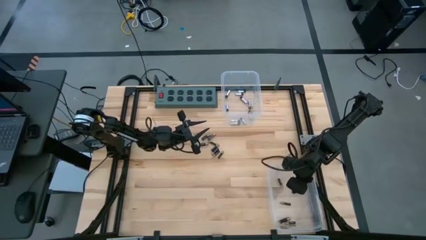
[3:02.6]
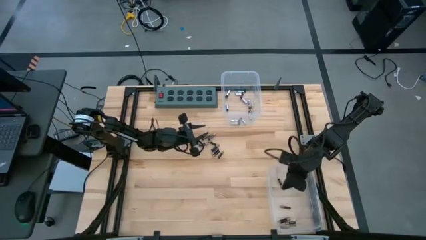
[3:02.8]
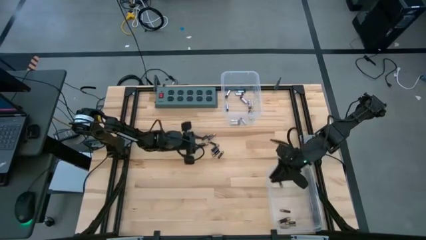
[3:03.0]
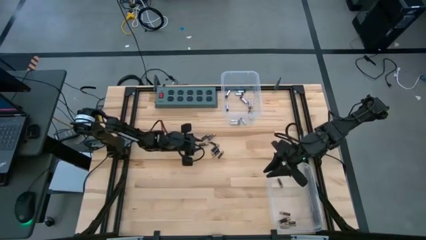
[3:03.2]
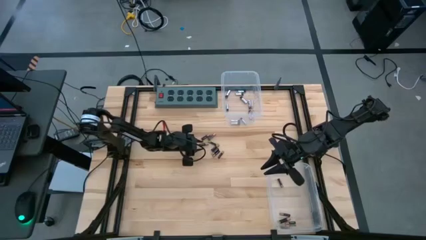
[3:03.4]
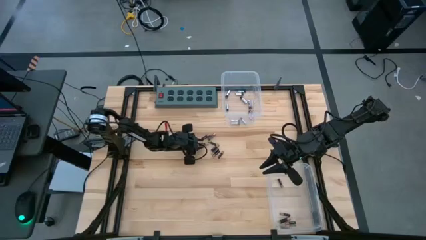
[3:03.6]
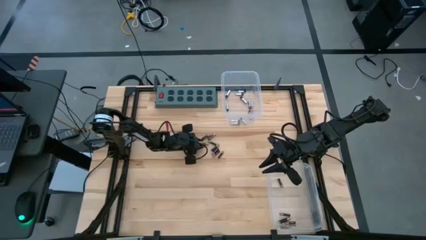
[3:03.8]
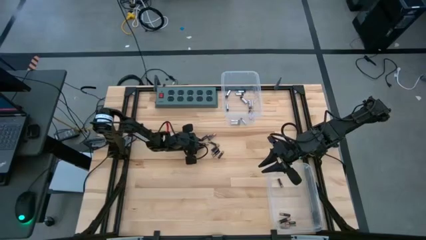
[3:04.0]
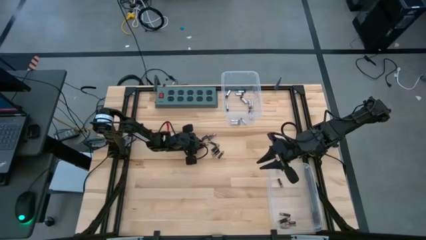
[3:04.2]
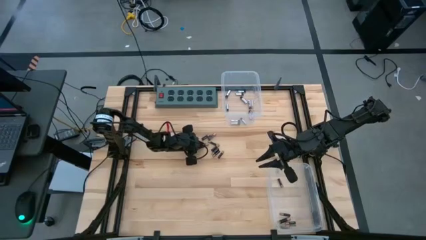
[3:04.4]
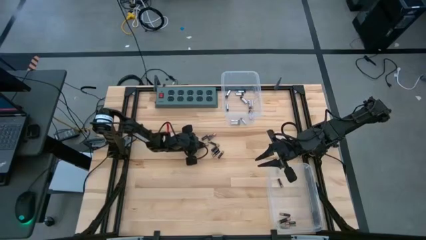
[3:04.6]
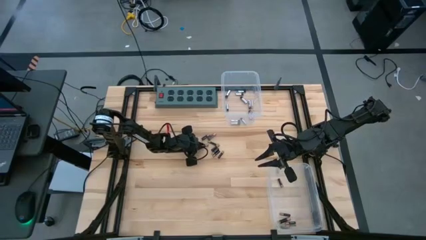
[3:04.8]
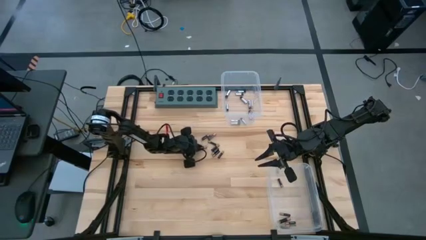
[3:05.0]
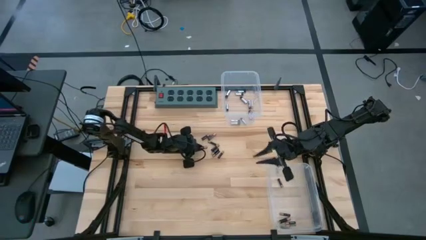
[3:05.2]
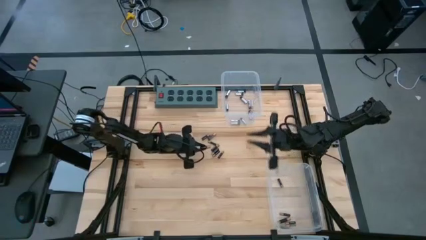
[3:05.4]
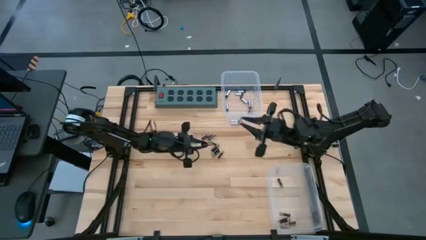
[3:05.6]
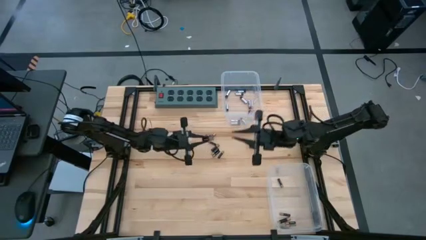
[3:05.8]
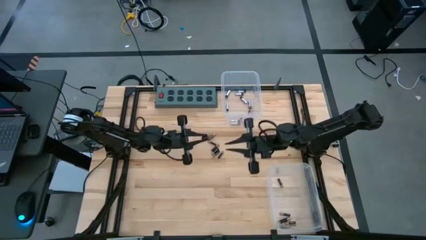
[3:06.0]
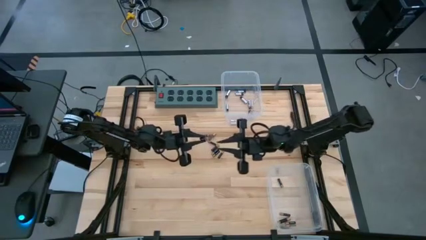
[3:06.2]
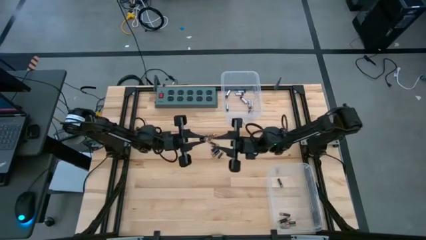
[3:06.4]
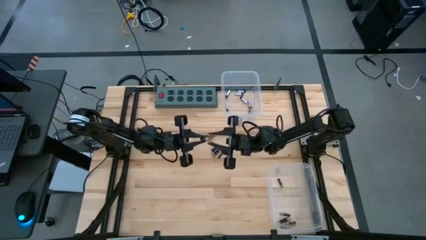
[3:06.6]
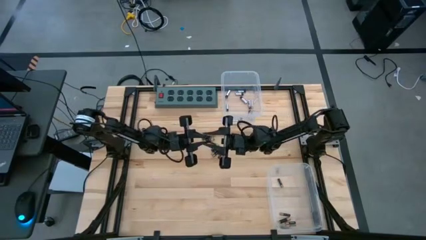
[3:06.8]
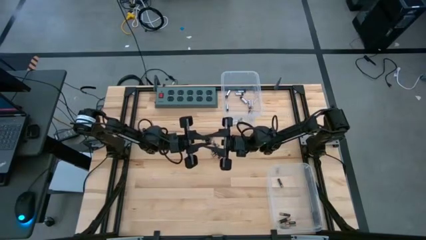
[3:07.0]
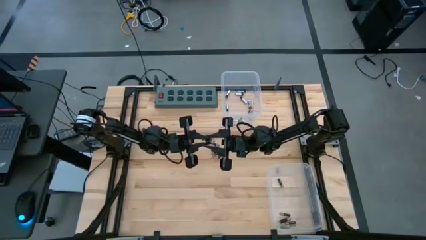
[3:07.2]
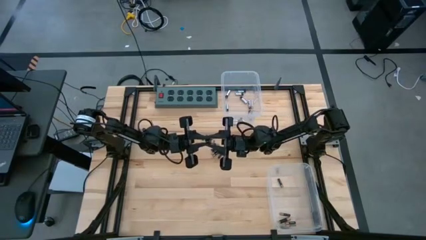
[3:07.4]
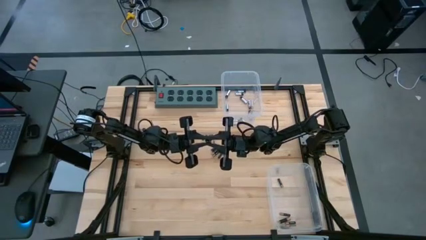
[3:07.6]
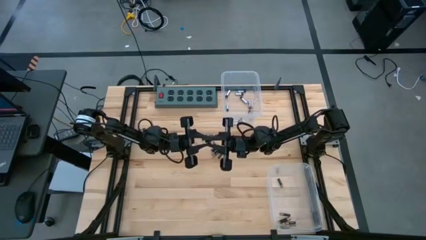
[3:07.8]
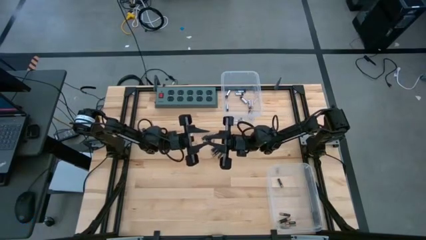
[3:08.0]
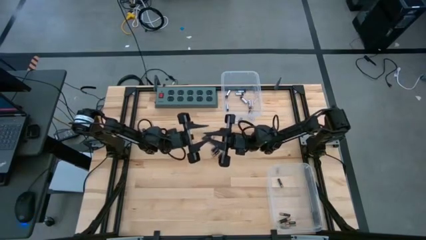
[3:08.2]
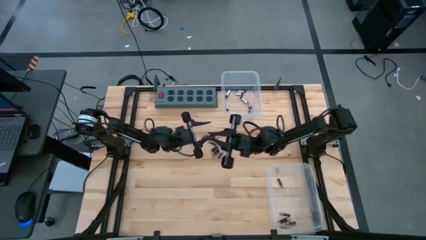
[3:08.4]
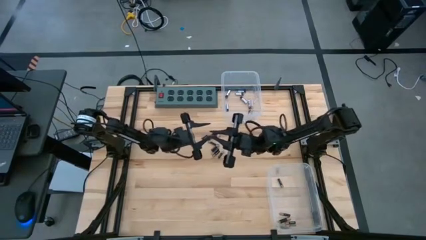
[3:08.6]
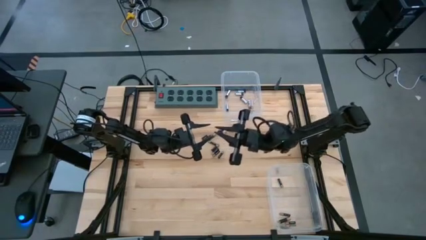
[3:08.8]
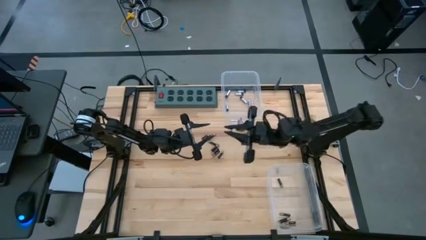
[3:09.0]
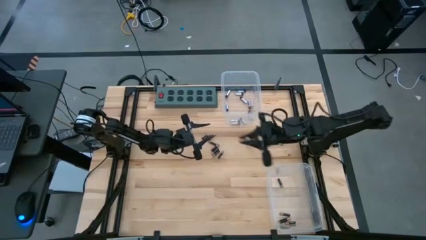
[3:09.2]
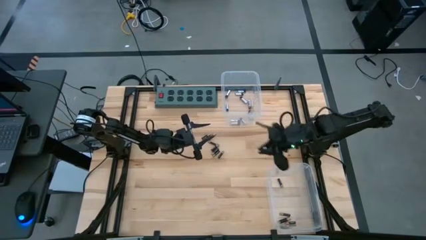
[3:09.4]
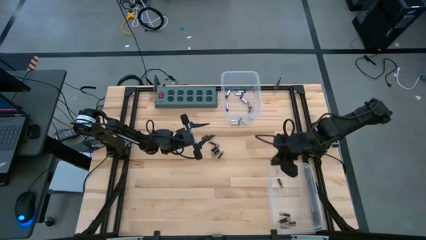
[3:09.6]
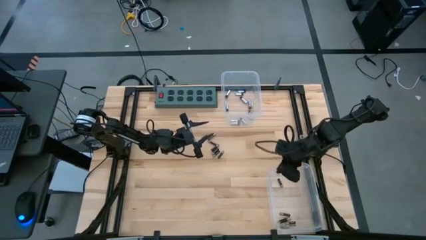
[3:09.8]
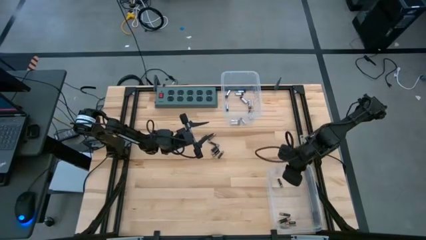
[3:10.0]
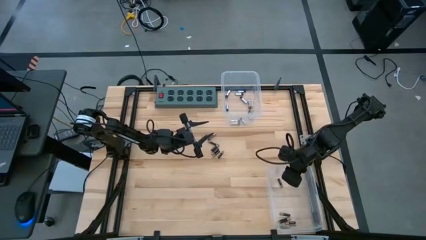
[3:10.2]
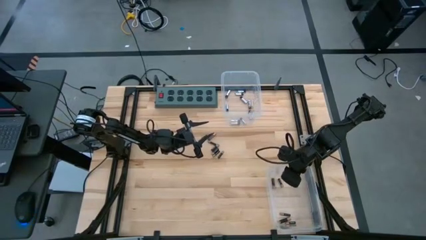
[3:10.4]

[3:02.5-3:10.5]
Task: Sort batteries
Put the black battery into the bottom transparent bin

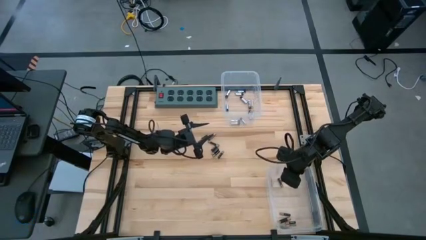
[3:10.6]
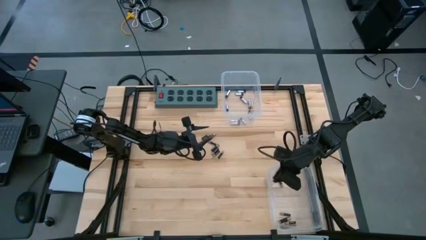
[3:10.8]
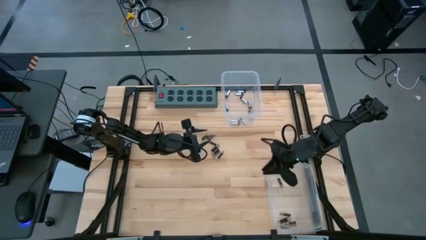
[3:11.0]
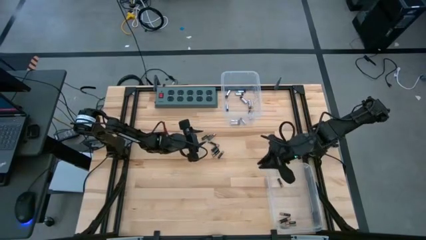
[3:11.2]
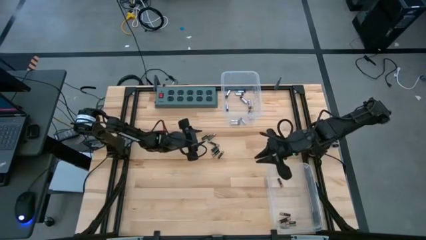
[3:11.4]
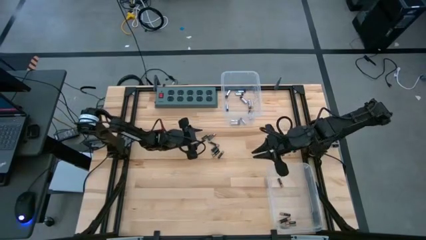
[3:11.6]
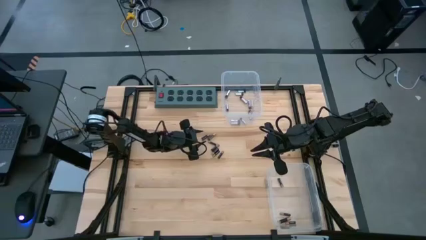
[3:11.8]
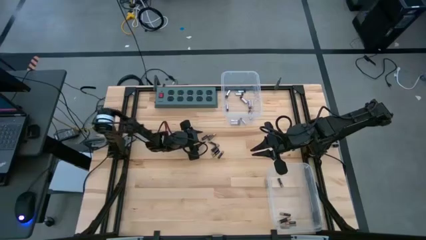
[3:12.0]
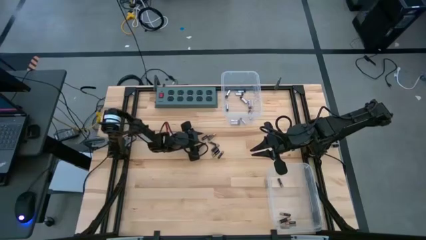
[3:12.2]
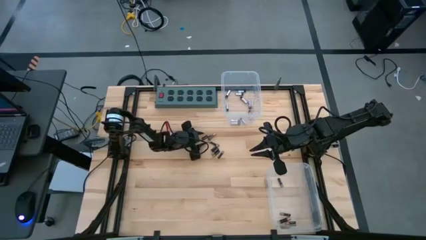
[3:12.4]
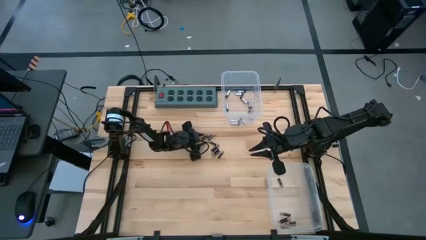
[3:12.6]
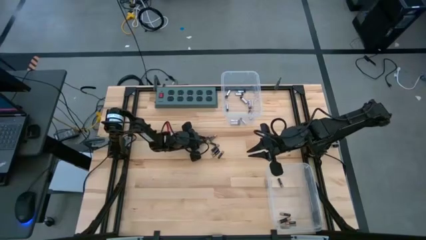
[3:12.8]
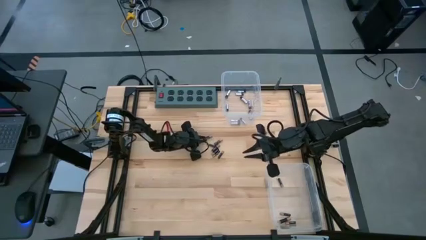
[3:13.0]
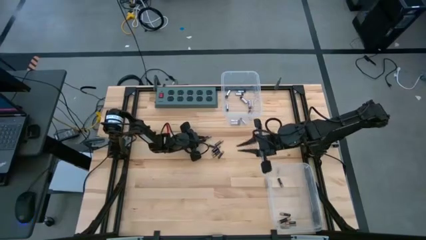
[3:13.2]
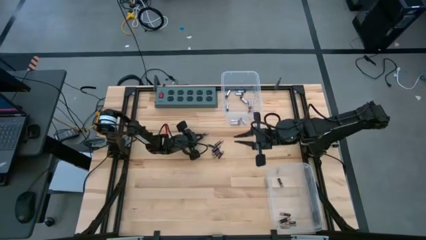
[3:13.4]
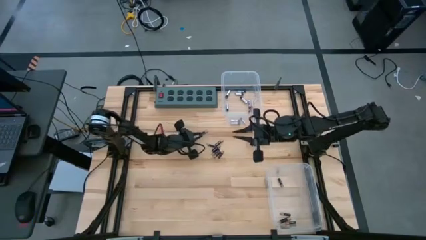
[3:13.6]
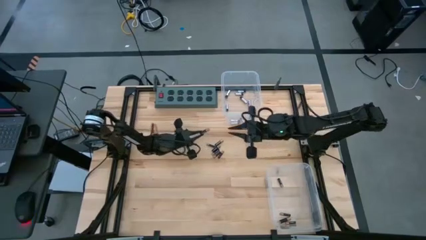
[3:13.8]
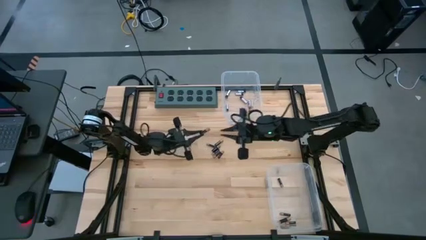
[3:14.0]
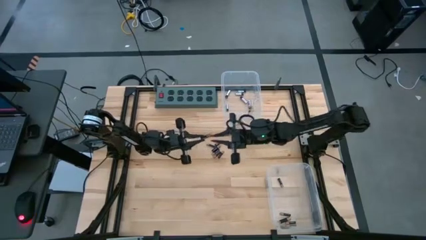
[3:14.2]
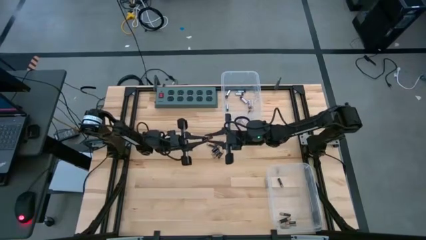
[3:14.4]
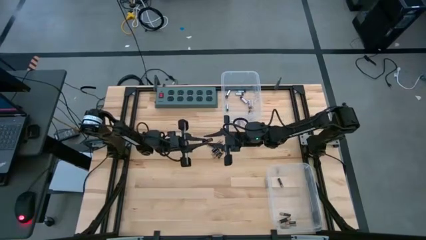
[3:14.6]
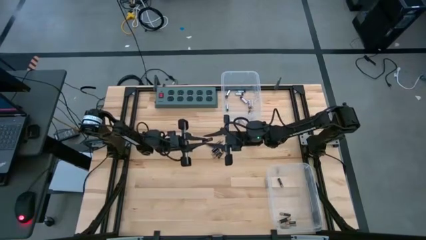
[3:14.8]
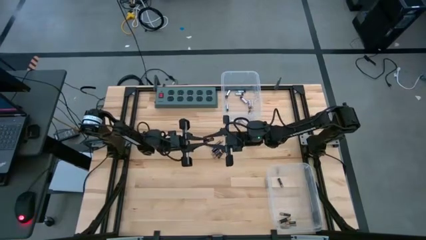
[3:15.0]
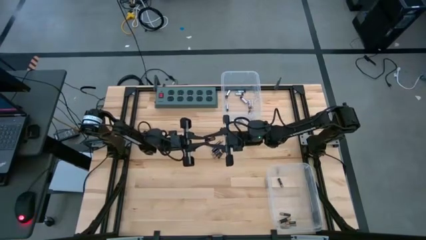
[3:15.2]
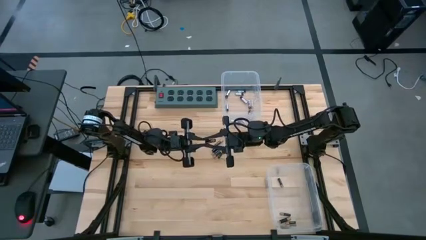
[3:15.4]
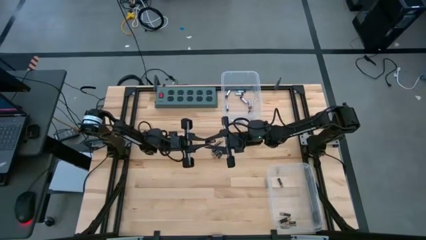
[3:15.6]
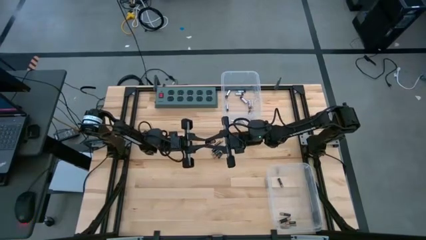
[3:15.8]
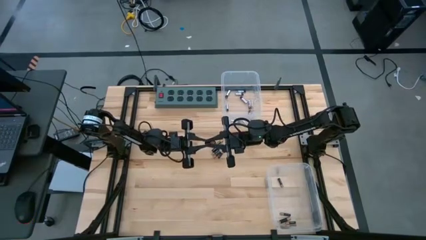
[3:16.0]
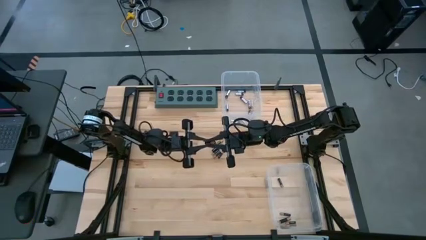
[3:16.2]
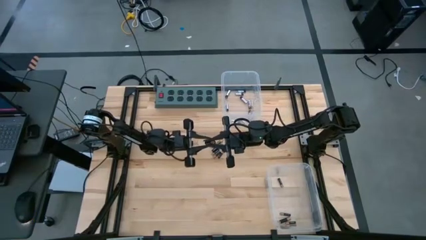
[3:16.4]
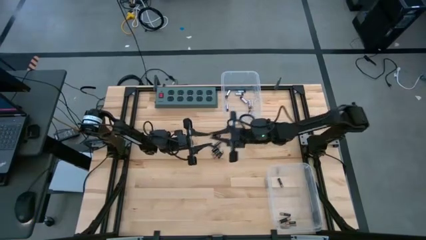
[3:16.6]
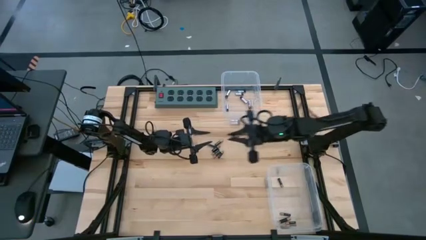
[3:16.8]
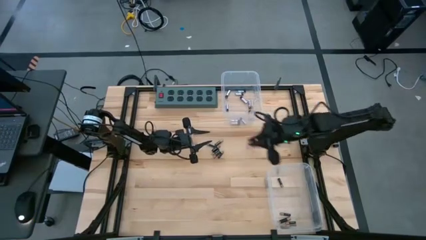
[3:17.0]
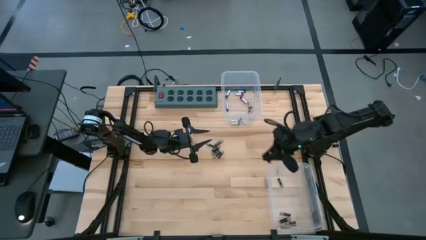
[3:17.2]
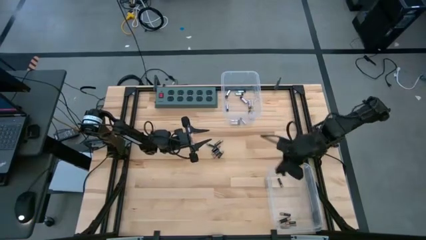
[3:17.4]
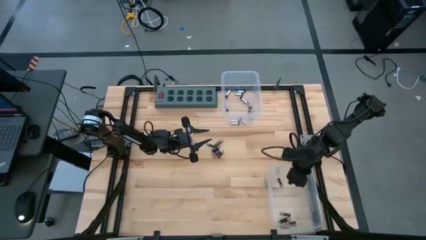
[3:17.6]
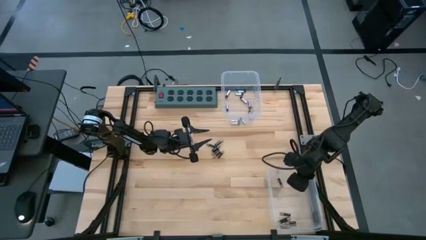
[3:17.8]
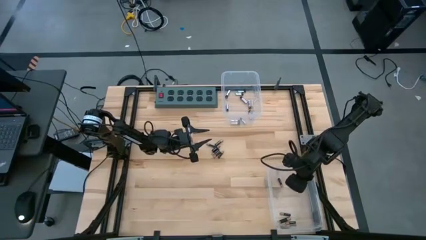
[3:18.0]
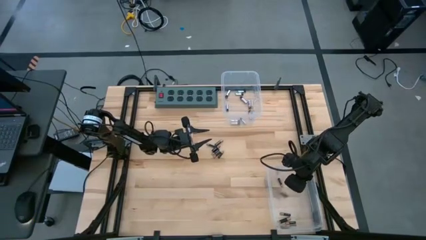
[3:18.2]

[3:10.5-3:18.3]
Put the black battery into the bottom transparent bin

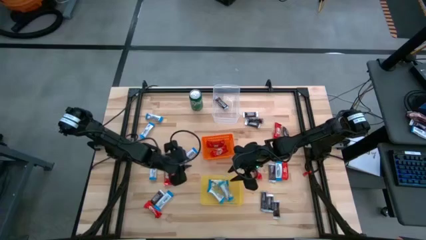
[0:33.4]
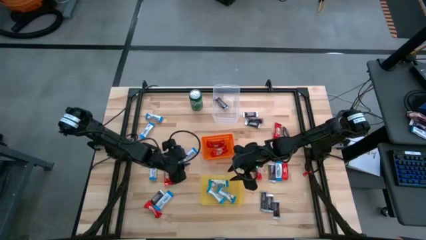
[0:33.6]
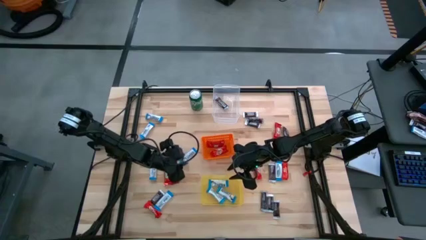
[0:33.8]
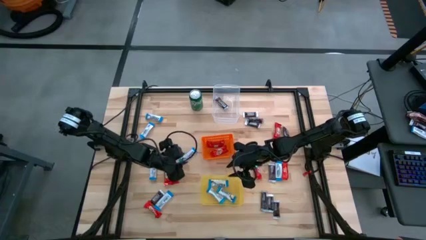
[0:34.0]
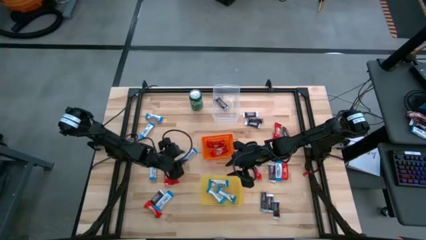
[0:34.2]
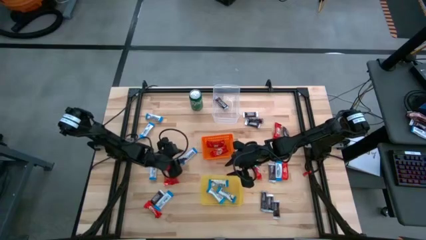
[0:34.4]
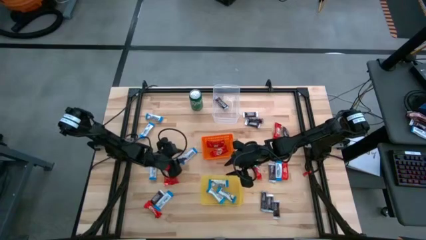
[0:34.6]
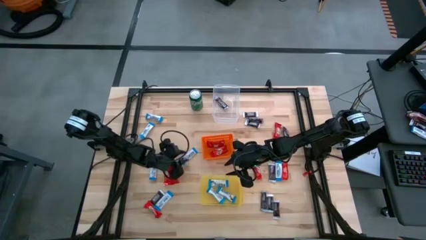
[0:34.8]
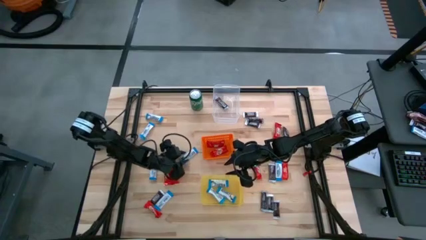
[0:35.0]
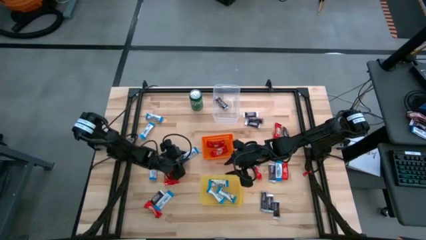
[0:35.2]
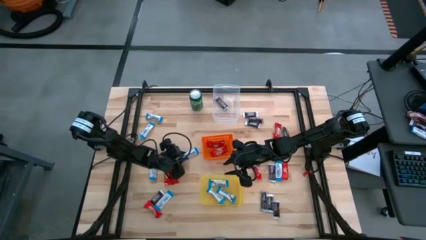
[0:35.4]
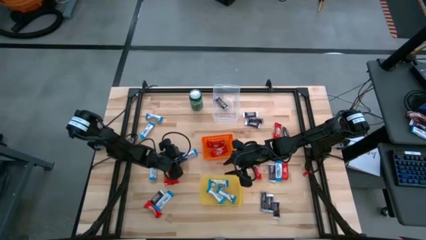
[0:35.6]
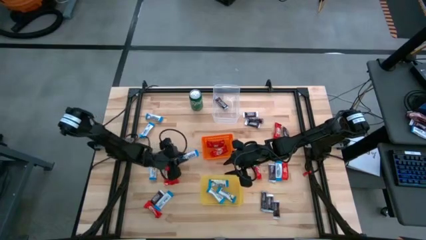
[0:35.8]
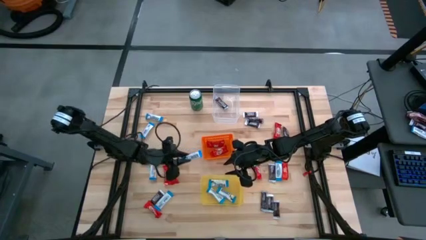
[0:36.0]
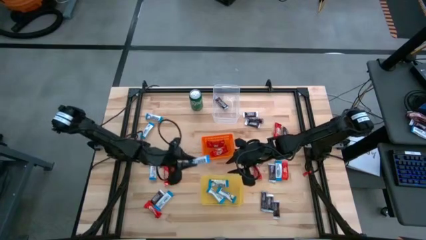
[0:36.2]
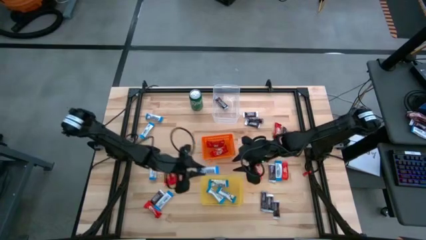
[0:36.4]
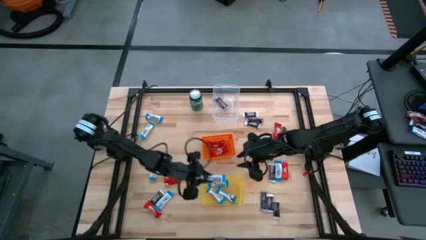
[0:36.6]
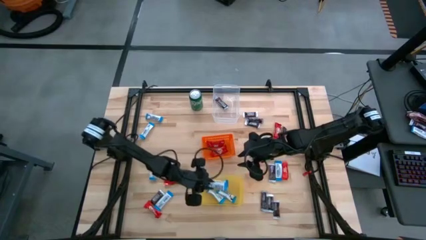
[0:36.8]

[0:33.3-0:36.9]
Task: Sort candy
Put the white candy into the yellow bin
